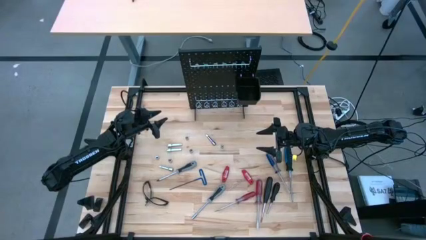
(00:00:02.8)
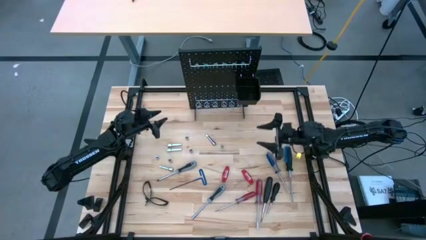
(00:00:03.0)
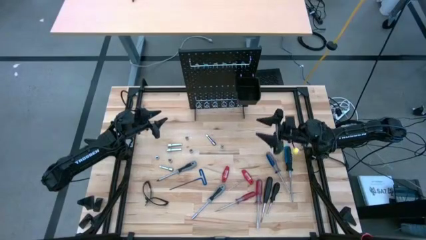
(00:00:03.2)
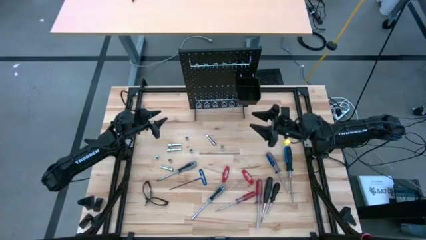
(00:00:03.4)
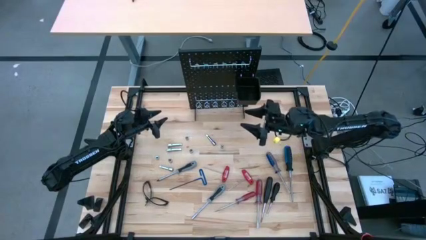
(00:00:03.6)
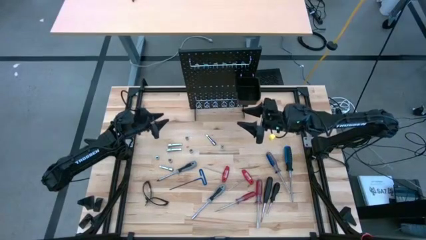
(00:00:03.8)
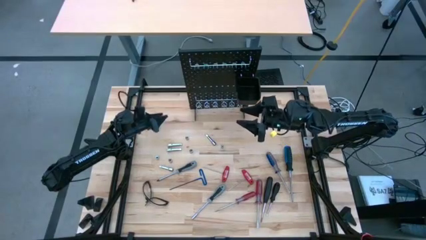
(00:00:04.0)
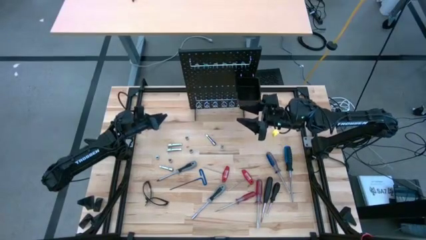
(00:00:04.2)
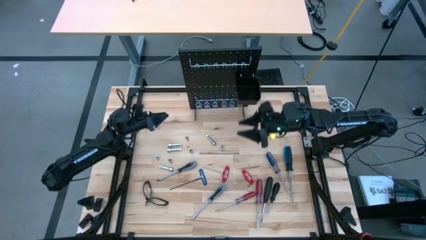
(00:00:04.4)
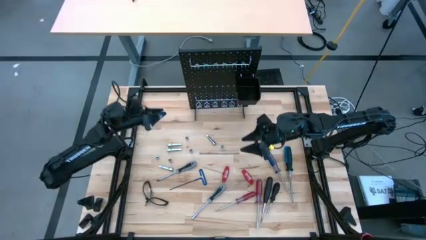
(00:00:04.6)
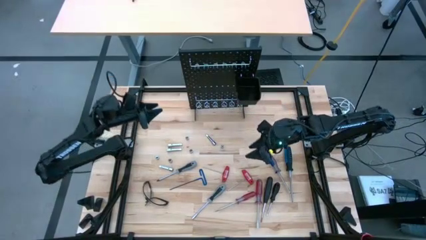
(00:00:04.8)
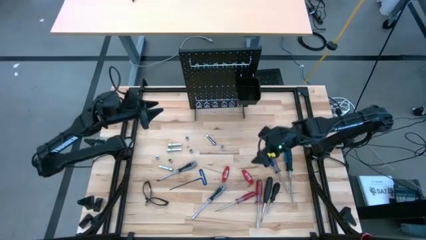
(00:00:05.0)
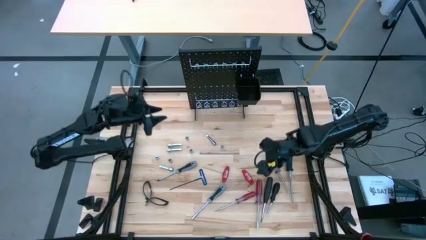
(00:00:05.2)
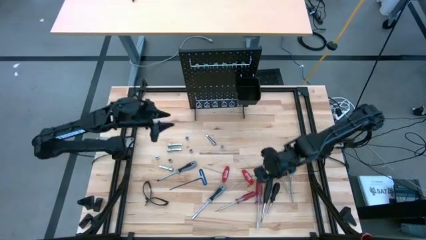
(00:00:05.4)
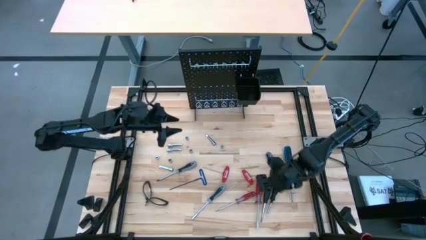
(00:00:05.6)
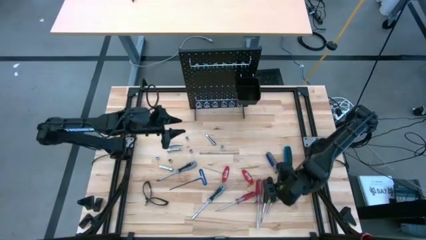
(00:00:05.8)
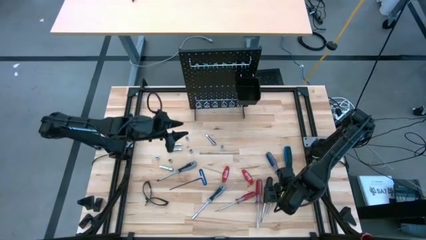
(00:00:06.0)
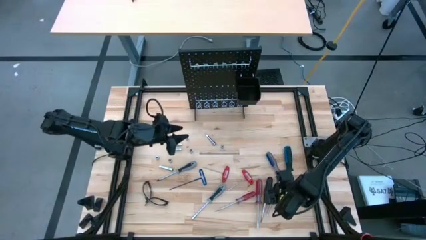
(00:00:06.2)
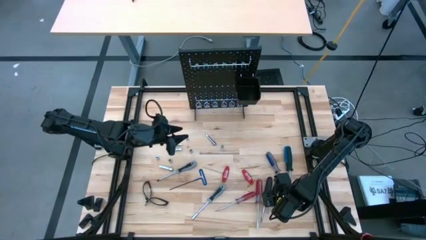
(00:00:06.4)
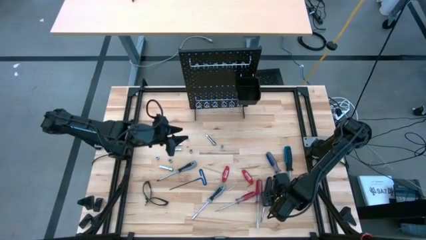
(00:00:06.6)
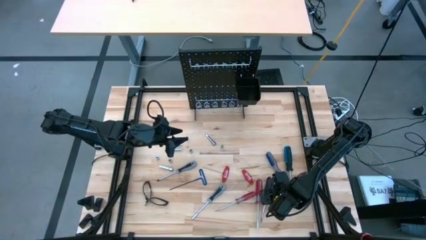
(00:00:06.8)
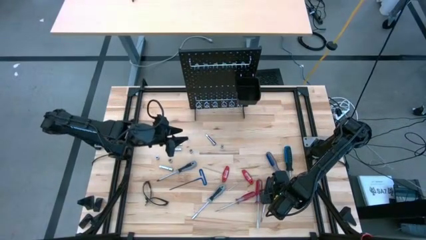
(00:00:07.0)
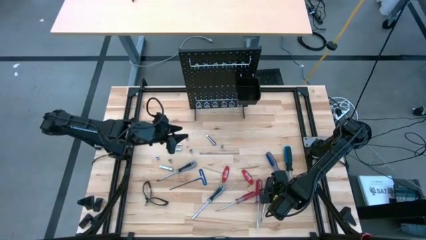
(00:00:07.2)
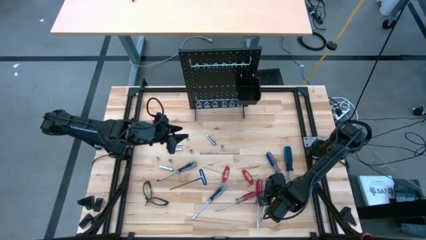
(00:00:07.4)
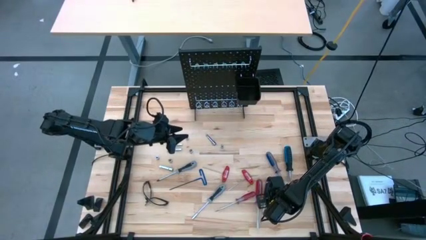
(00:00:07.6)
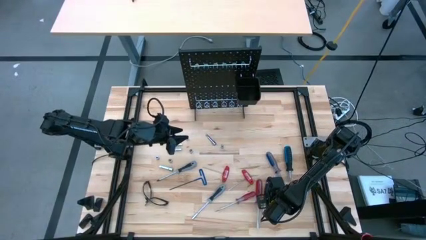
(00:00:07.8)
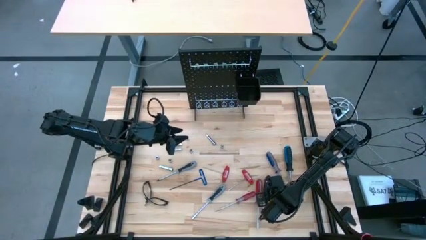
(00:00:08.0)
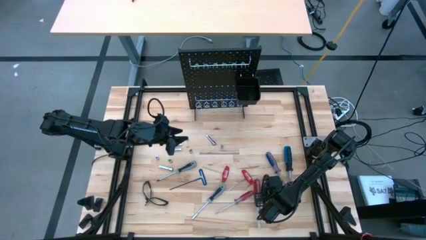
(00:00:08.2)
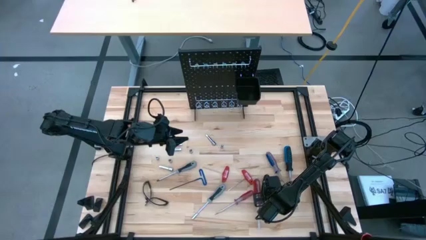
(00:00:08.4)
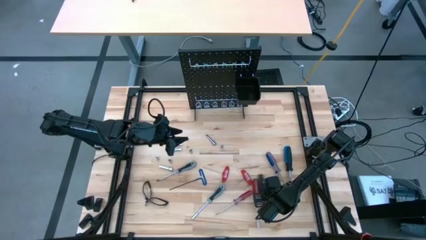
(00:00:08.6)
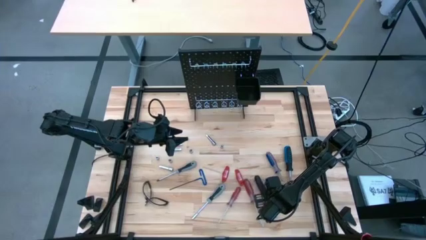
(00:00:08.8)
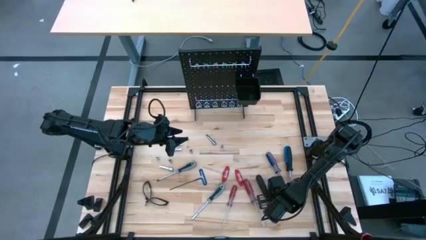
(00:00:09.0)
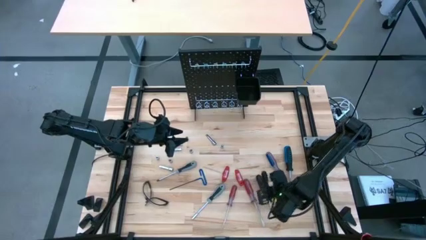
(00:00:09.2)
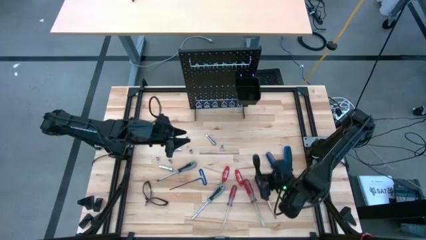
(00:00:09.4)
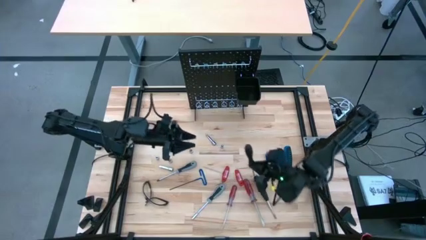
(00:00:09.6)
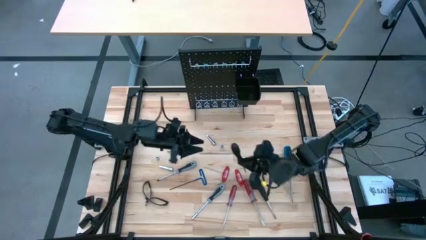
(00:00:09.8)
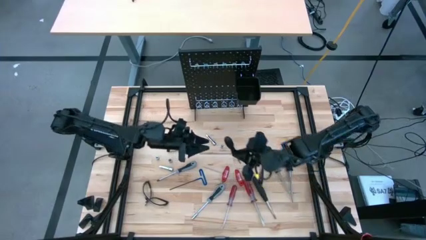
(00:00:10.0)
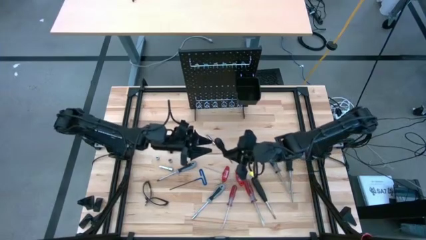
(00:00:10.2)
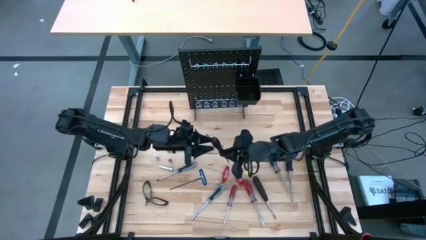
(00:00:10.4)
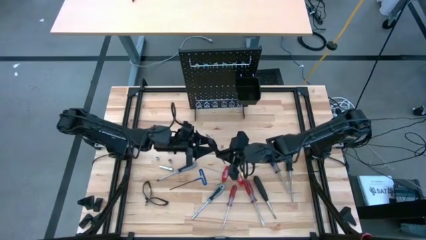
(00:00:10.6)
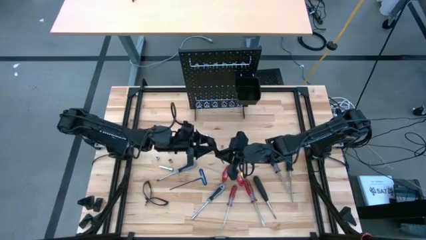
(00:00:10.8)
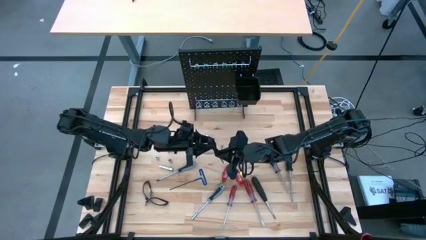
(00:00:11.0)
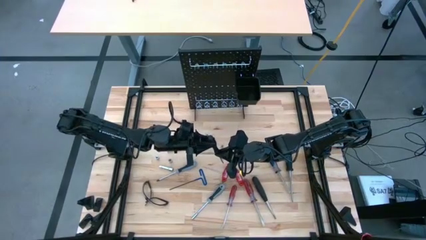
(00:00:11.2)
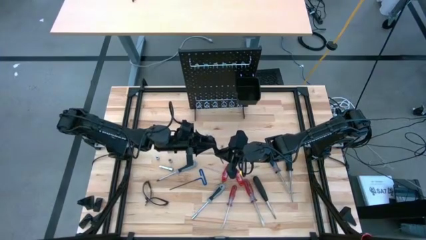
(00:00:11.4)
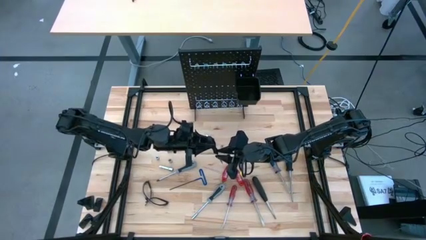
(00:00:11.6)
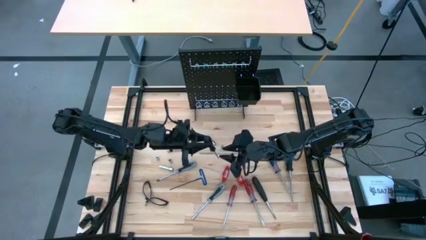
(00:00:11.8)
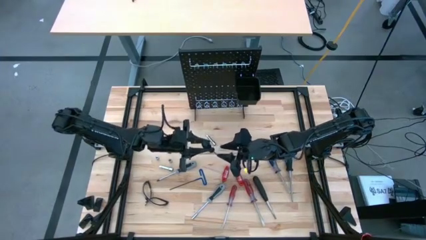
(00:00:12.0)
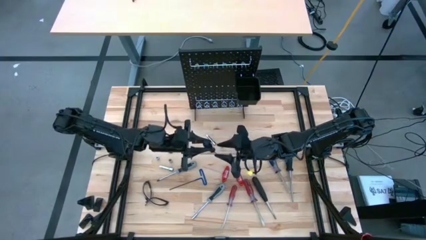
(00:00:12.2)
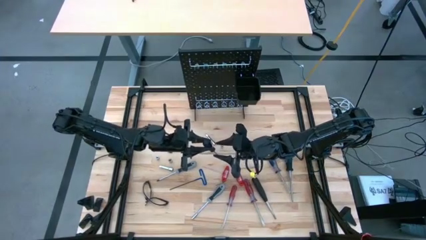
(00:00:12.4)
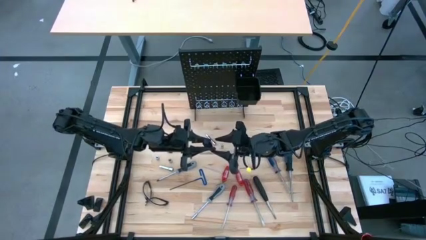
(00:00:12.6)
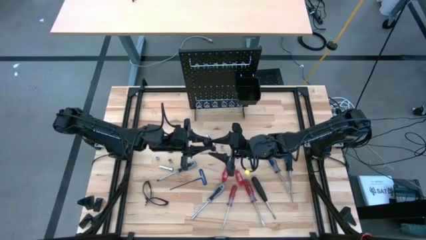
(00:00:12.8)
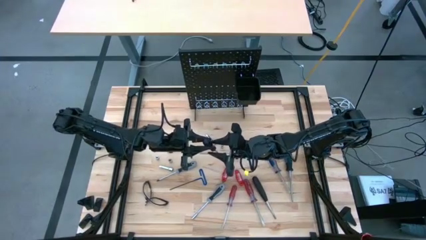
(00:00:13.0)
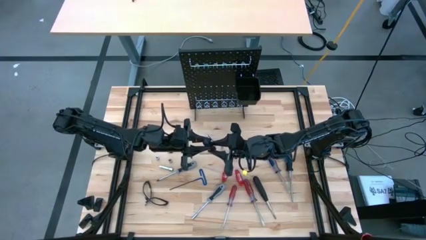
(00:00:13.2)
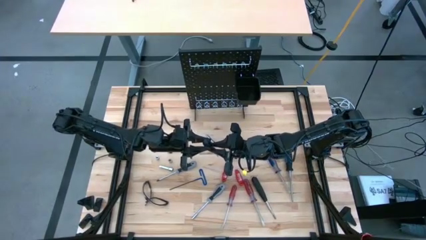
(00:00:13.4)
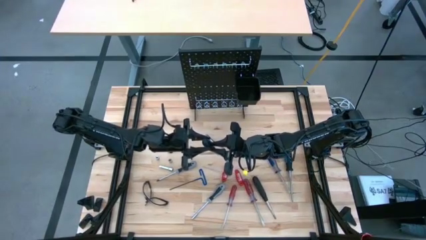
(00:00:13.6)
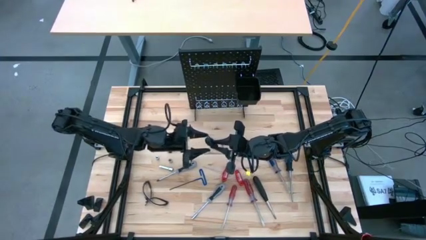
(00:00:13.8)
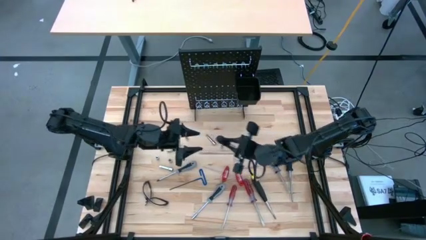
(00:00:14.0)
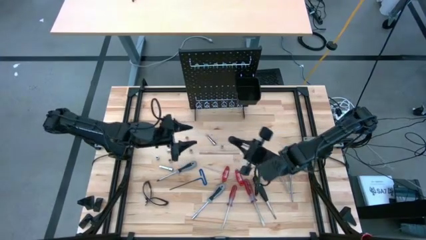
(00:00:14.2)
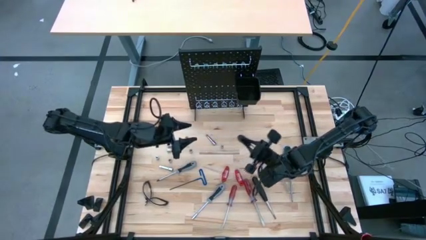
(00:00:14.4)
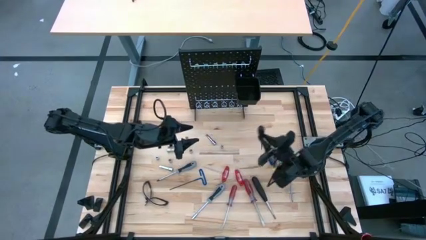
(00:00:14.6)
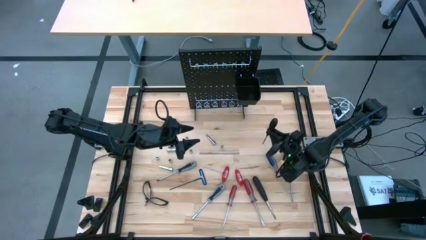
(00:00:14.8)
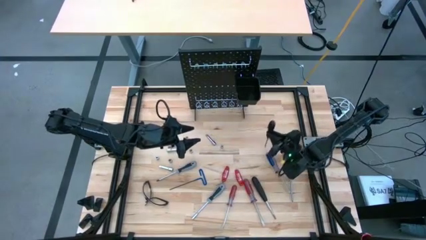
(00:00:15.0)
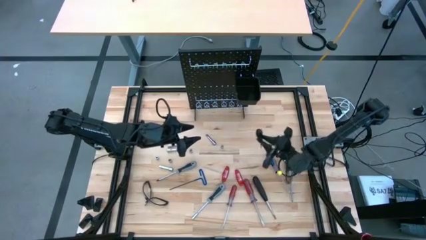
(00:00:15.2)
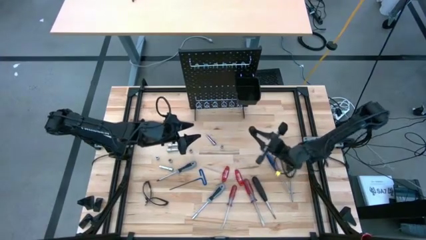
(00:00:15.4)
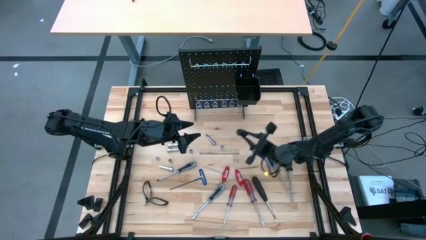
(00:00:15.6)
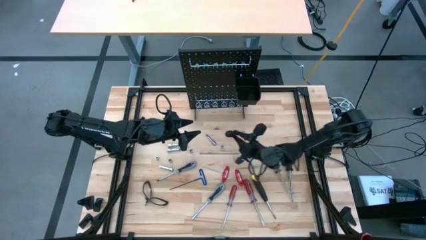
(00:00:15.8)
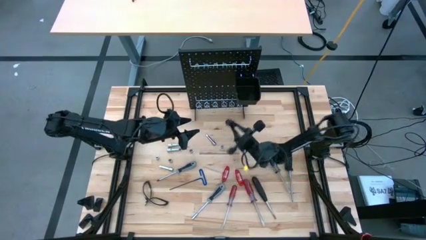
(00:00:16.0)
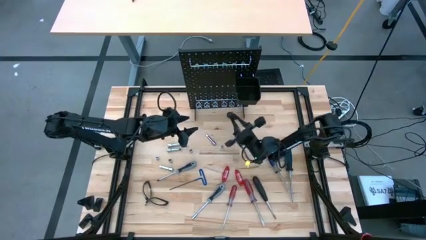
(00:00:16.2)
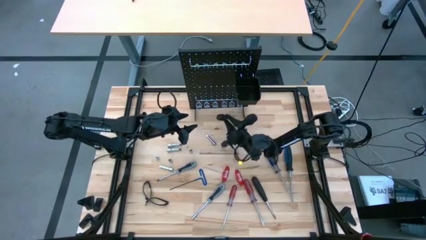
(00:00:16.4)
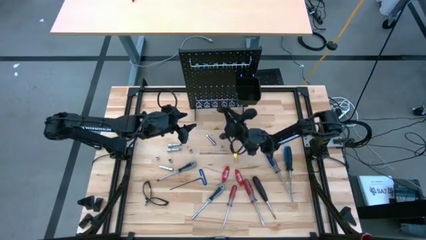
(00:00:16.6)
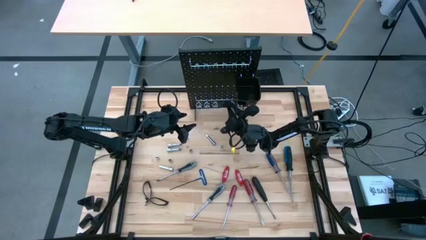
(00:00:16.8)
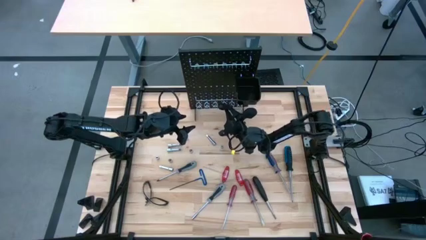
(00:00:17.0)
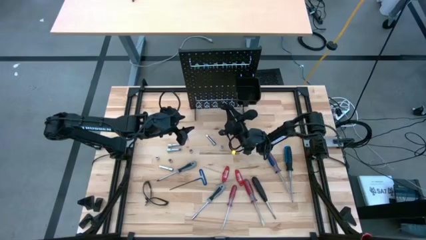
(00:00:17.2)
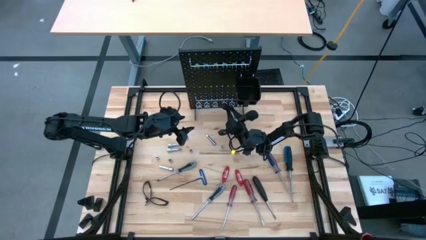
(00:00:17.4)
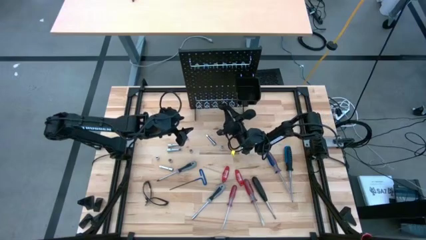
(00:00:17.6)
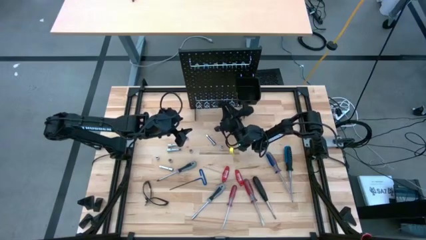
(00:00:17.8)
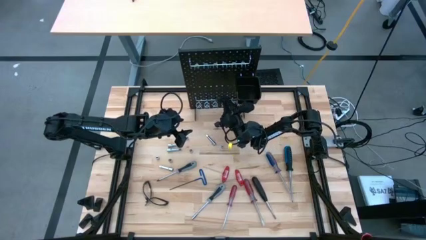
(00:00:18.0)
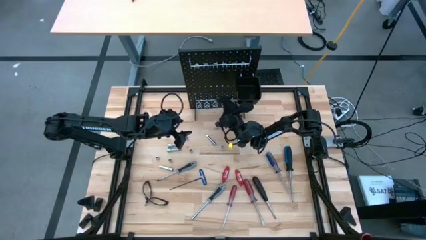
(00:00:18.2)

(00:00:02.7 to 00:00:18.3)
Task: Hang tools onto peg board
Hang the black screwdriver on the pegboard
